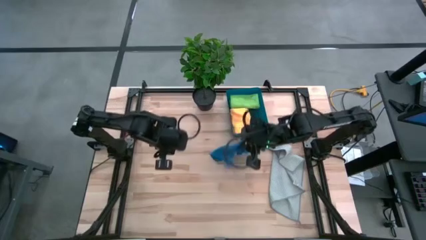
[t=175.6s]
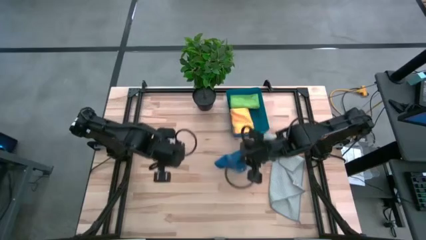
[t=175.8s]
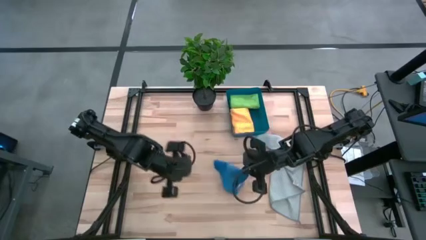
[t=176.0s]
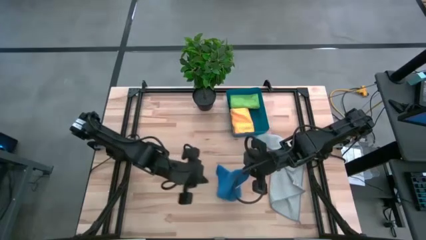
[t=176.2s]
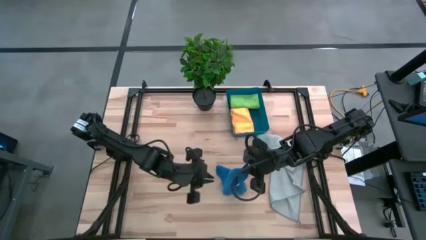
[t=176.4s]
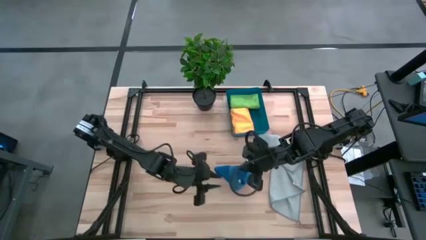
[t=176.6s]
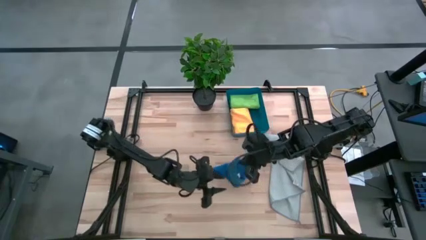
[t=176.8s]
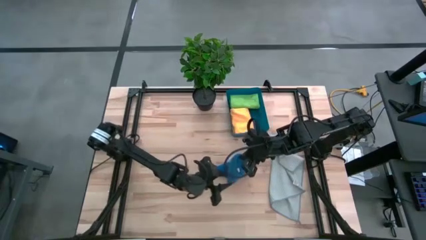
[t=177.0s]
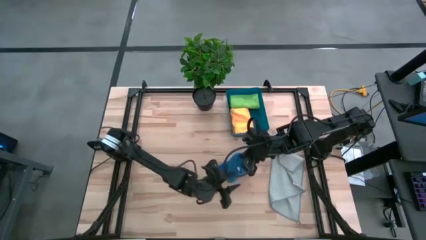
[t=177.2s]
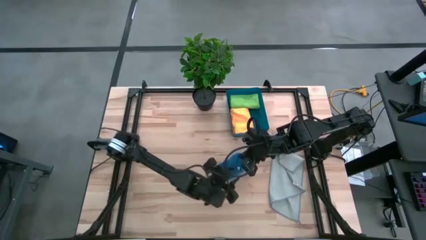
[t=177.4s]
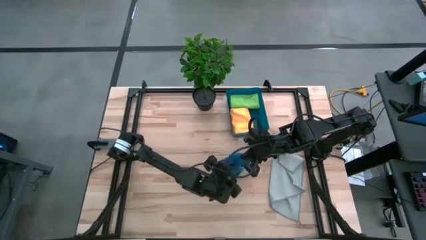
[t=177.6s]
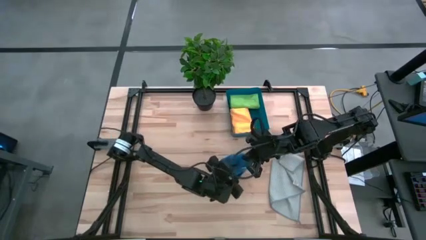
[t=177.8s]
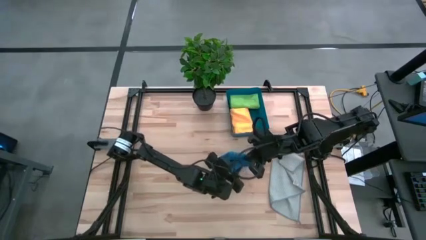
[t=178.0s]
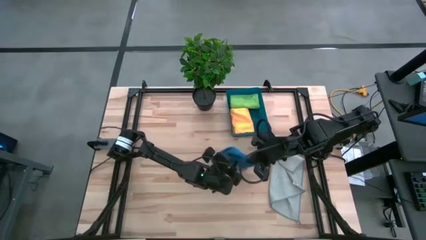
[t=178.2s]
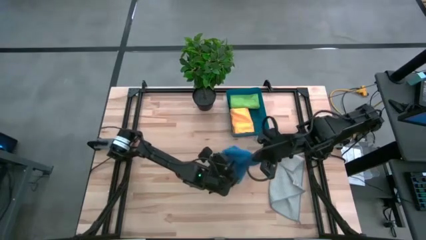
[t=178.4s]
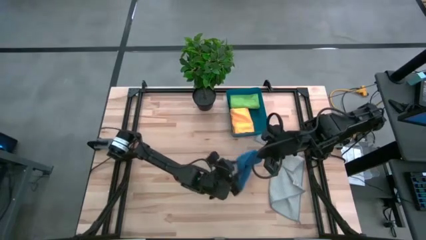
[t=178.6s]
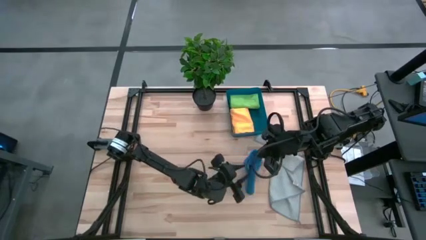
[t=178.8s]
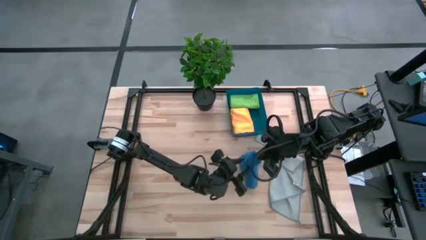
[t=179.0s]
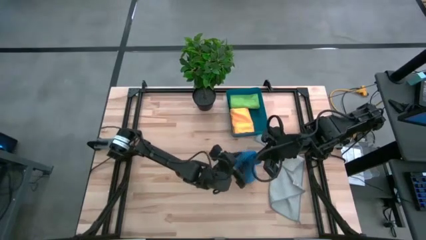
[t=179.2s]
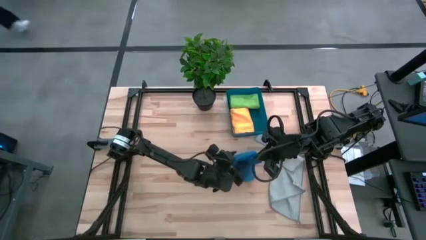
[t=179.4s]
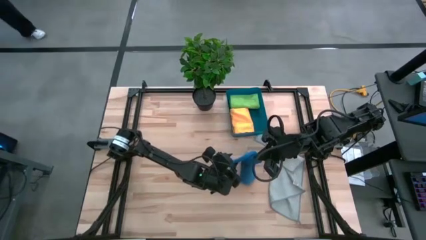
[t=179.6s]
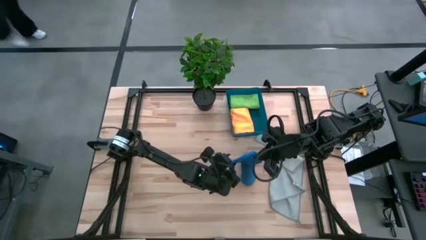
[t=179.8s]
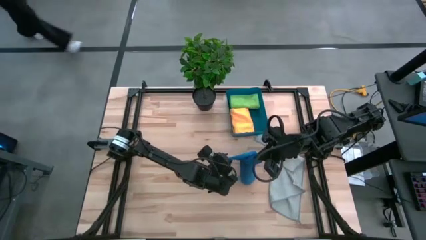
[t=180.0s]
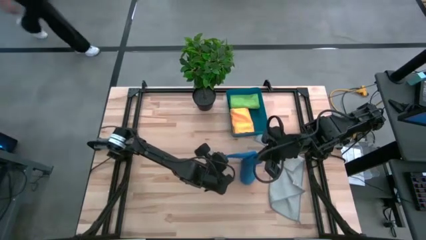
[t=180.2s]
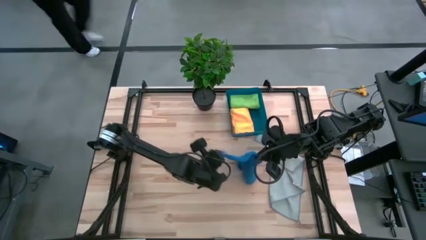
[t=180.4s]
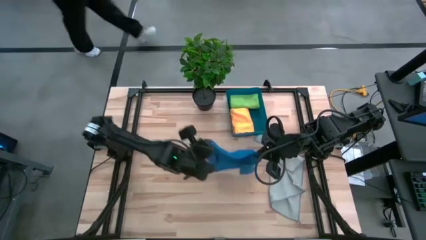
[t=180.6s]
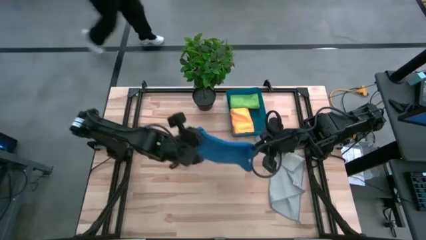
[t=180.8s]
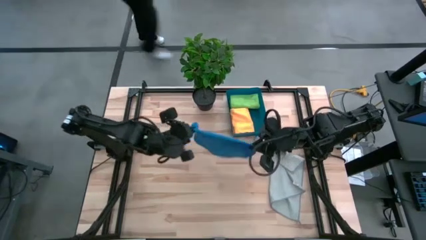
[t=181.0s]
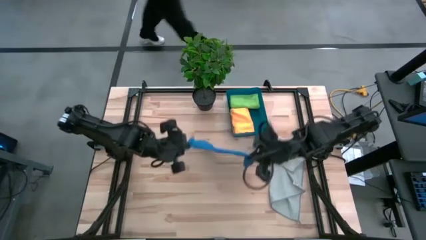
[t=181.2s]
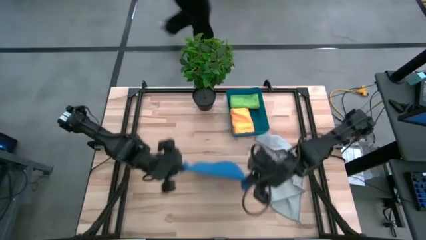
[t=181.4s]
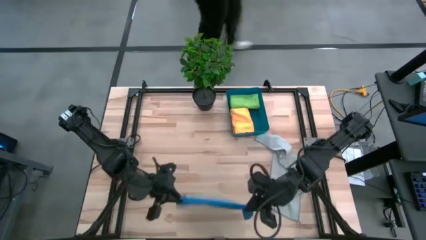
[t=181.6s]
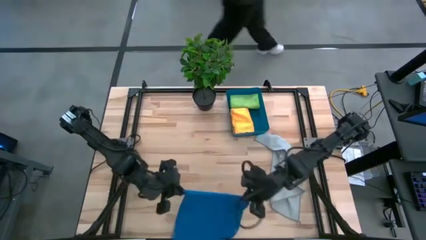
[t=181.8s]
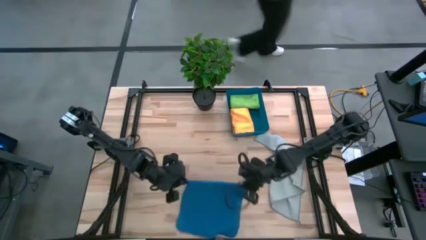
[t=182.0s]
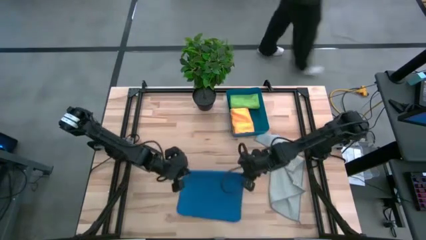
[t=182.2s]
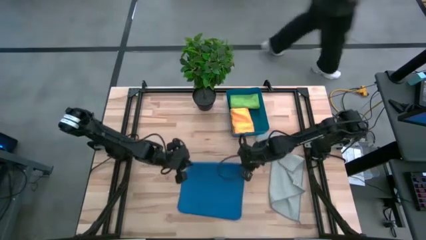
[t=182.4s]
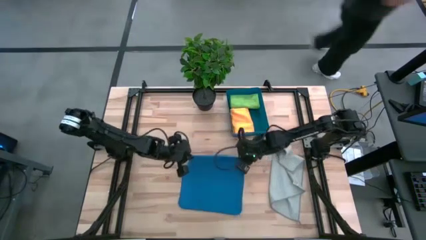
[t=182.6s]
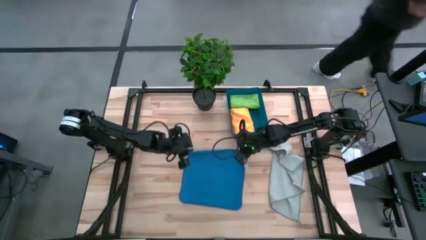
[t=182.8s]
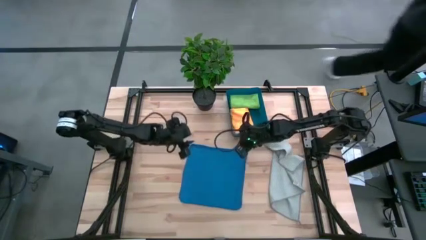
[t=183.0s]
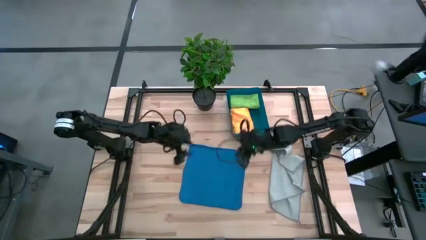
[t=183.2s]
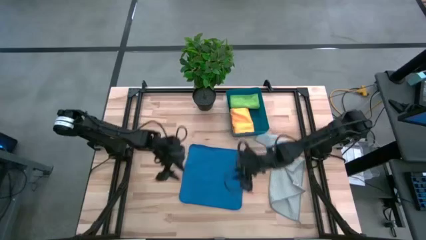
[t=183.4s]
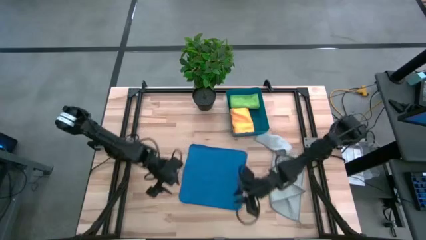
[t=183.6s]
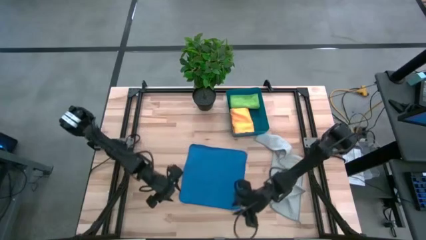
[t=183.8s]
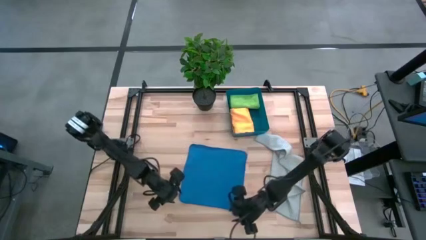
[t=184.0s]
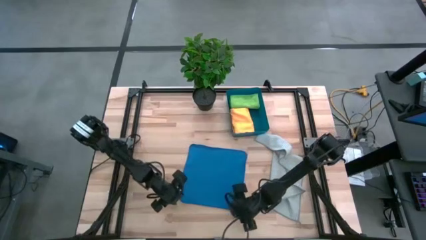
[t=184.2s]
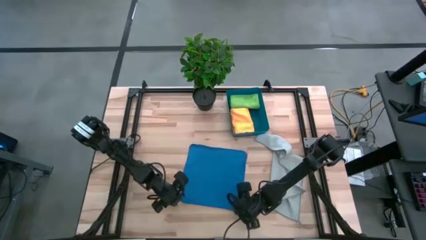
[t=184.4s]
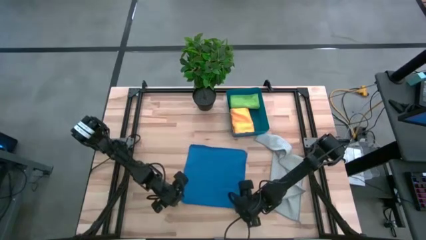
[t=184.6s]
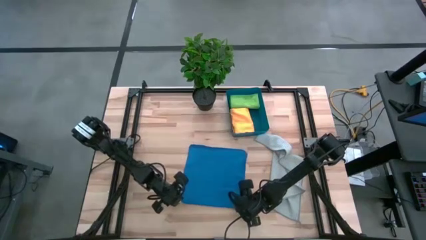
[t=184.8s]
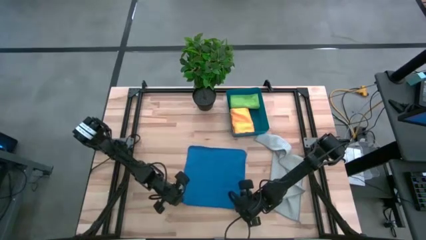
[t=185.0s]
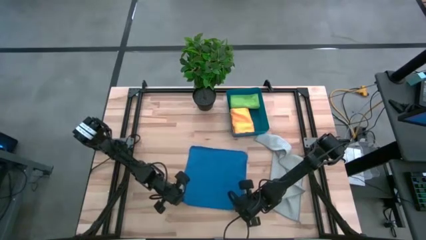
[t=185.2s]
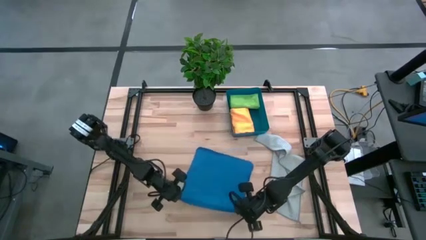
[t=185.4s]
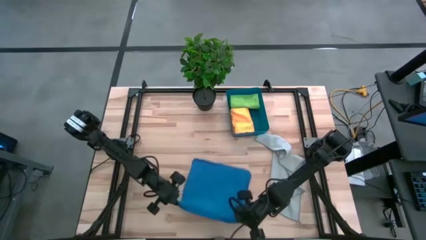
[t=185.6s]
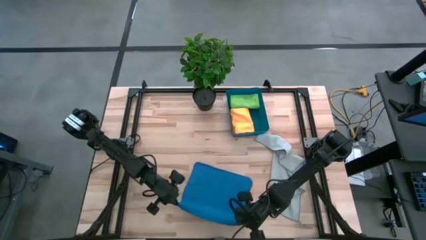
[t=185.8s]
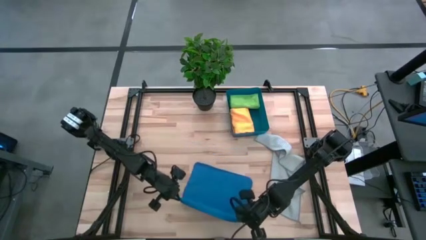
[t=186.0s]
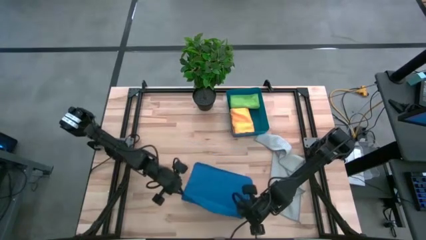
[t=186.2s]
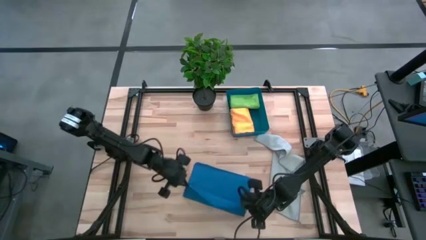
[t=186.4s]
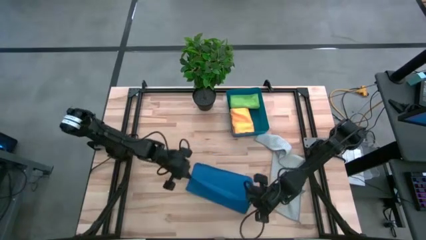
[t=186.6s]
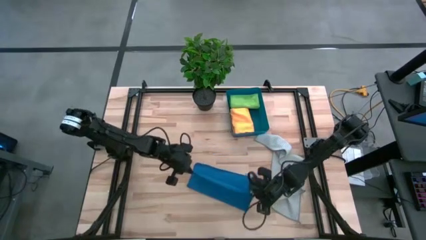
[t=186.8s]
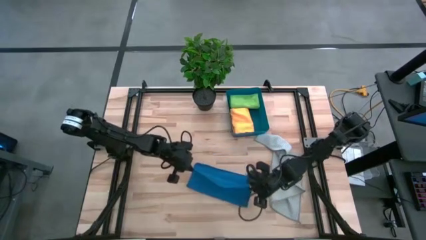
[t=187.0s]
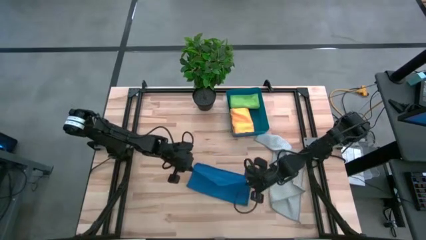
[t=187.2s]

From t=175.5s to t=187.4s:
Task: Fold microfiber towels
Fold the blue microfiber towel

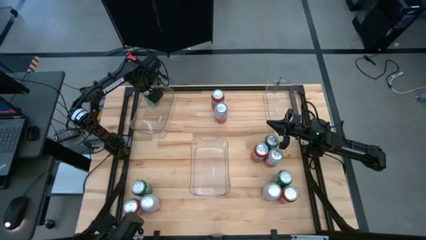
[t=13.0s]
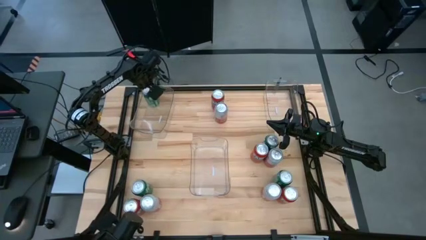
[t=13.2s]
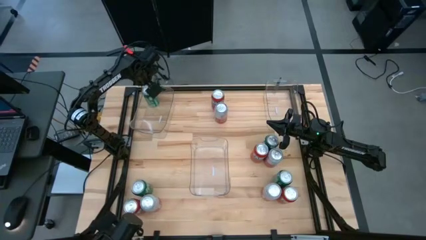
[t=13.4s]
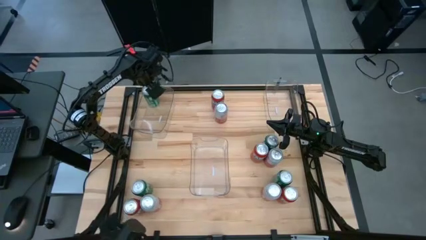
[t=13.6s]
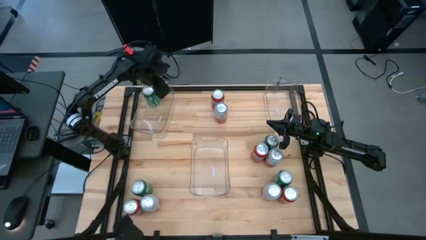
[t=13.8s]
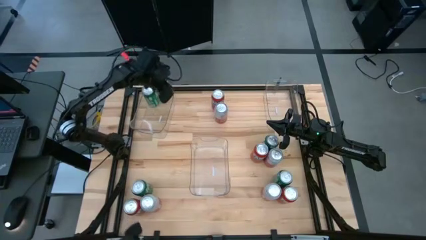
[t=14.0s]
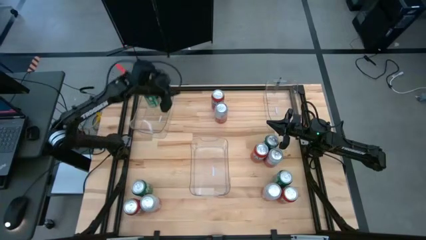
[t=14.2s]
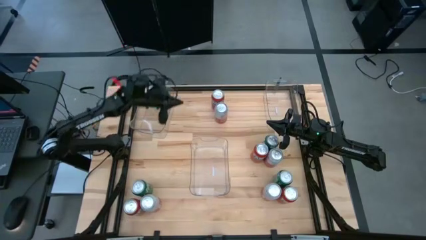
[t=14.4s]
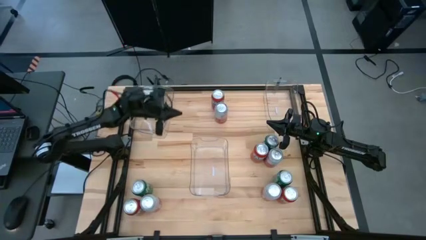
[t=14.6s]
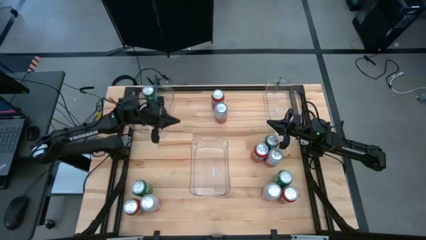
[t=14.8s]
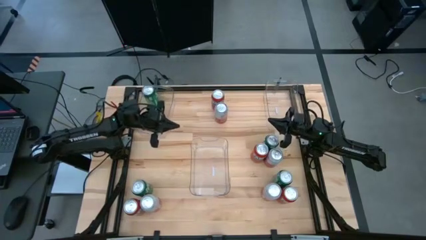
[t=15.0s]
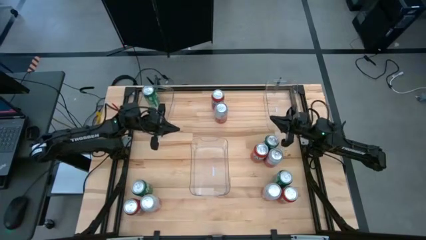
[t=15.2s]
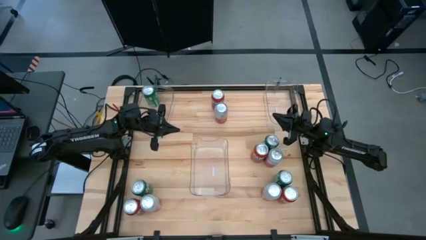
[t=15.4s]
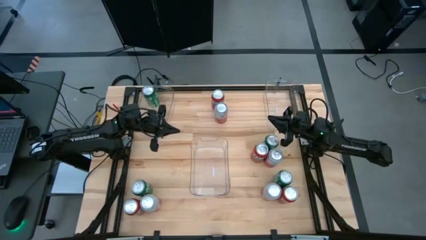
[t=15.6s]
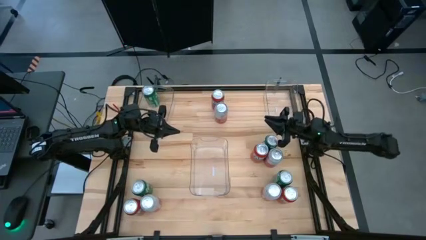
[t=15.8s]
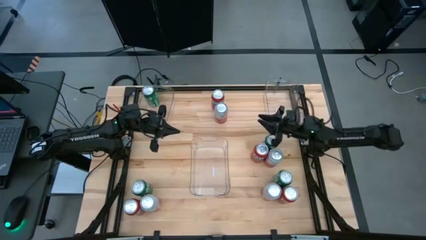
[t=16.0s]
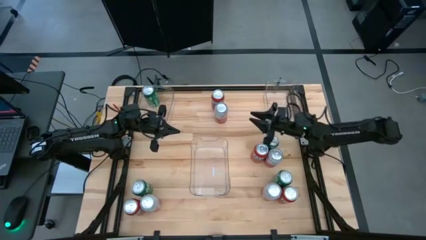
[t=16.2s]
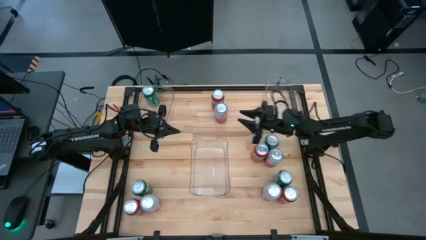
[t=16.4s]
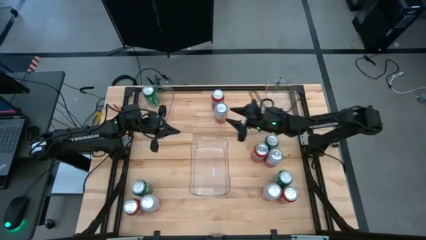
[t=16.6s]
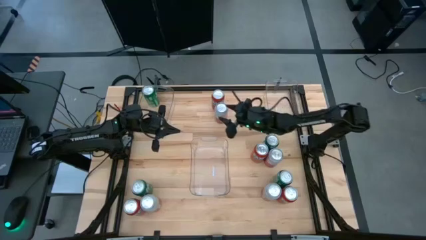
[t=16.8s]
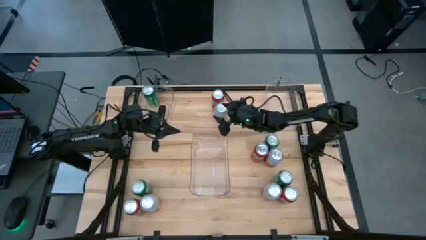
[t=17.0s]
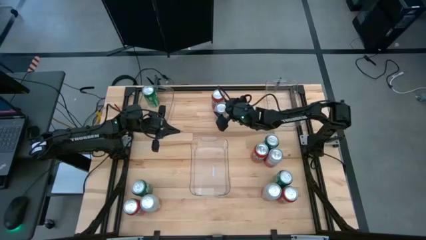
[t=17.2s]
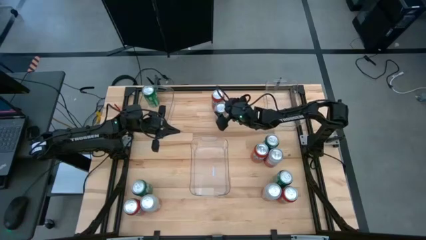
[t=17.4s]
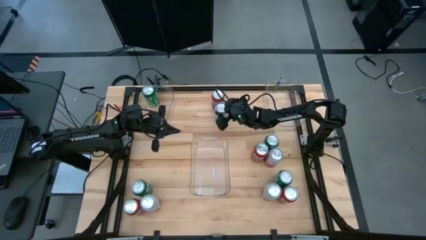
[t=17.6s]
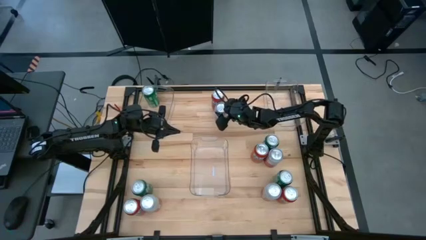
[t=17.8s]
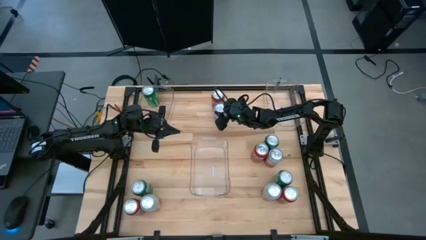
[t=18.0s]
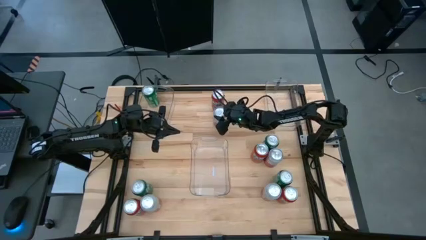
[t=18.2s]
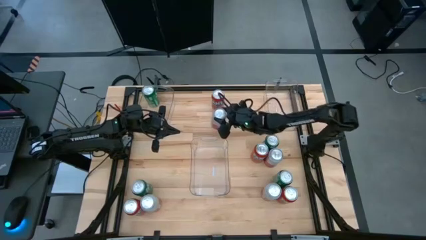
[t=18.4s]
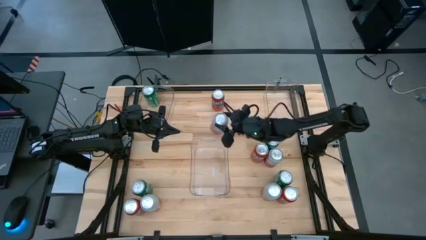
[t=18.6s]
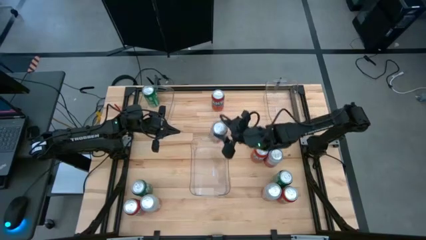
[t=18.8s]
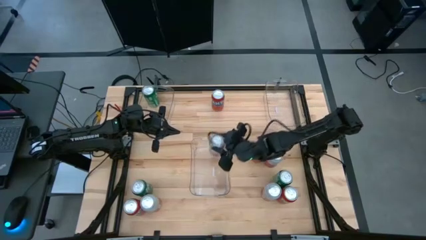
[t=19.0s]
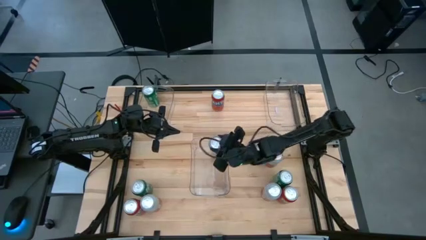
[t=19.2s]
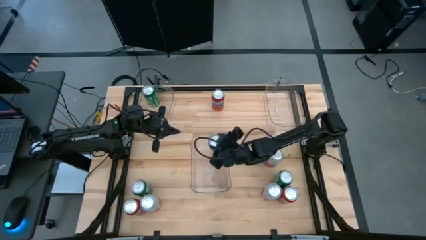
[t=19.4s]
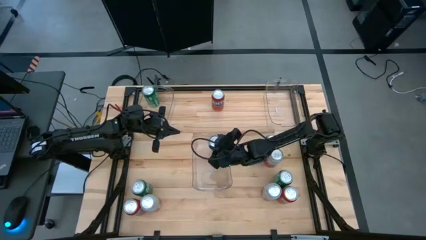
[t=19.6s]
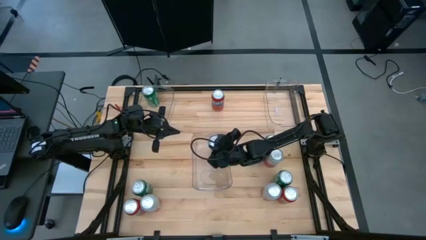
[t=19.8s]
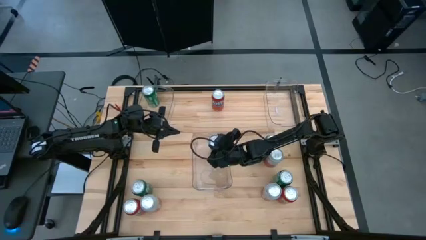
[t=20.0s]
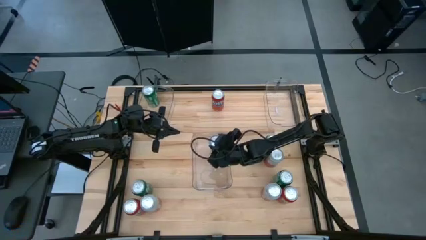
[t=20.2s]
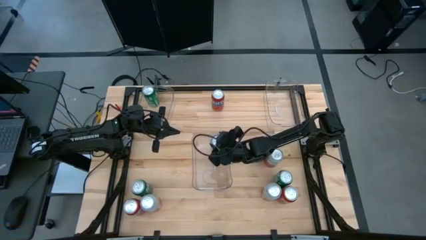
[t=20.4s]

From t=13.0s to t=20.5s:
Task: Sort soda cans
Put the pink-white soda can into the center transparent bin
